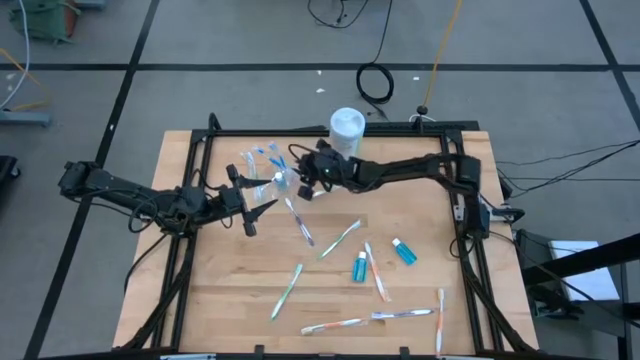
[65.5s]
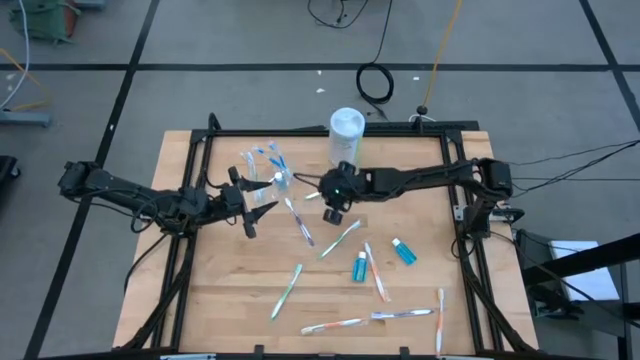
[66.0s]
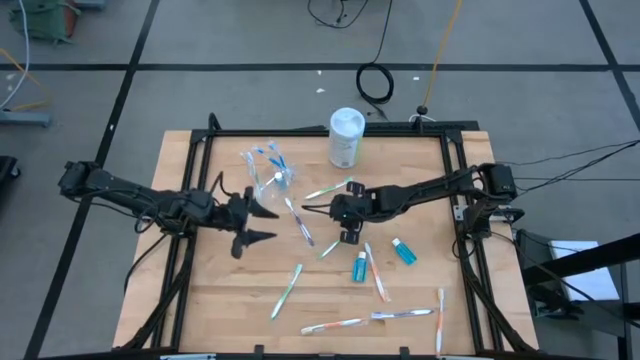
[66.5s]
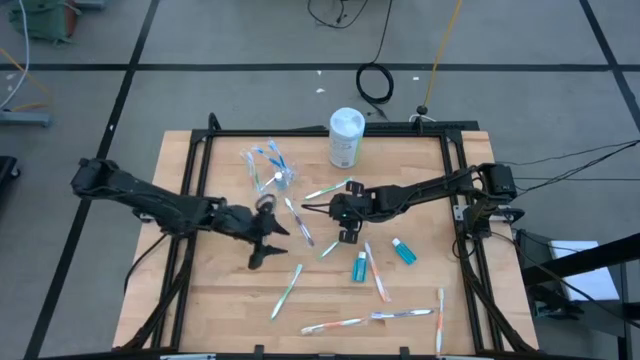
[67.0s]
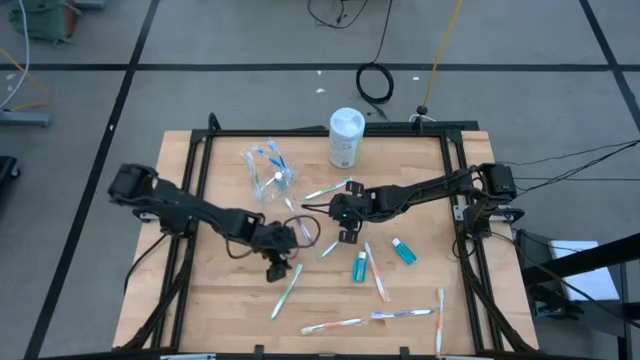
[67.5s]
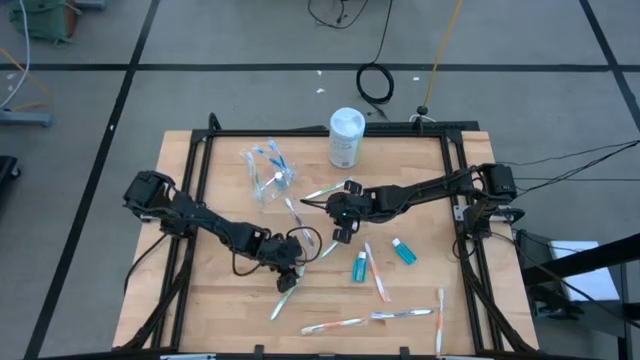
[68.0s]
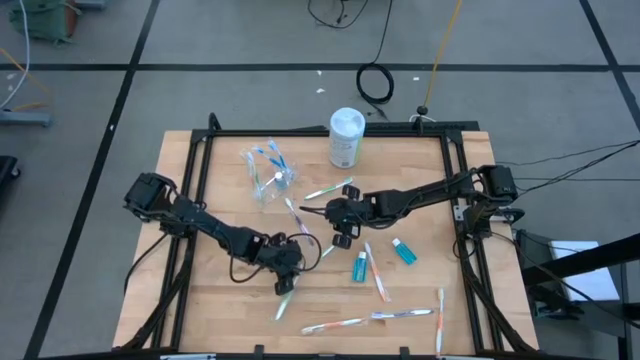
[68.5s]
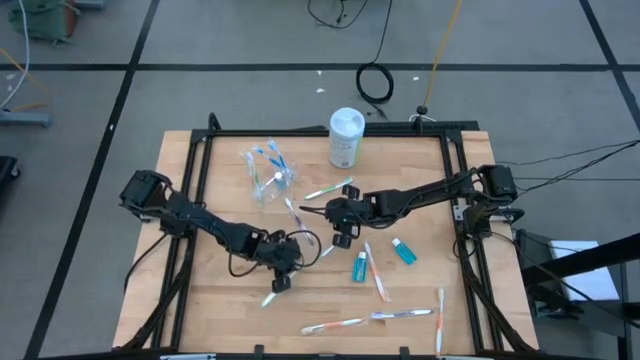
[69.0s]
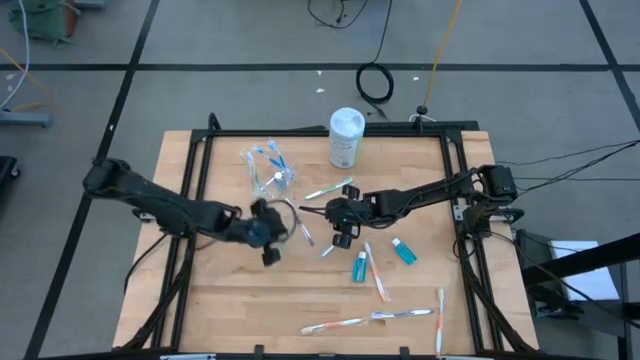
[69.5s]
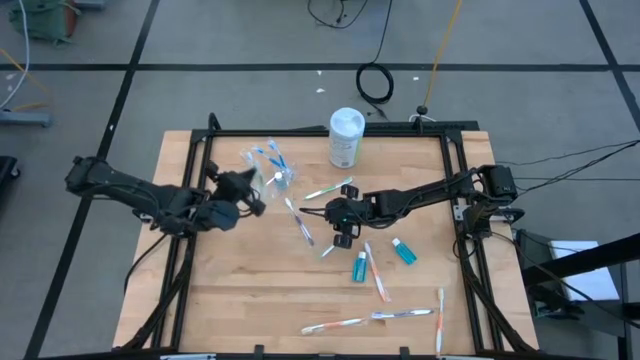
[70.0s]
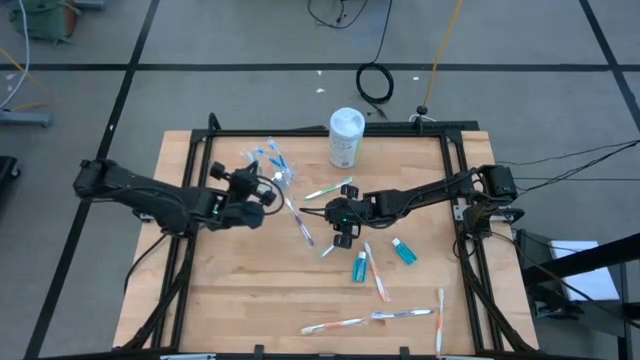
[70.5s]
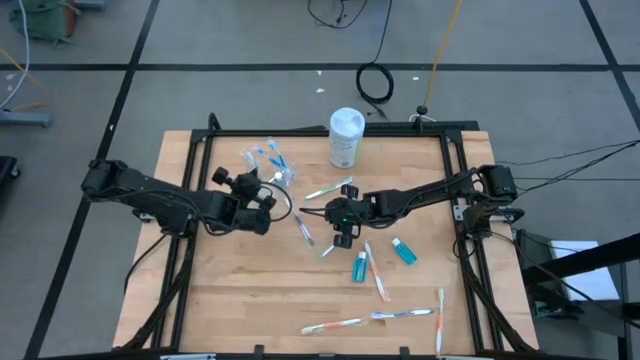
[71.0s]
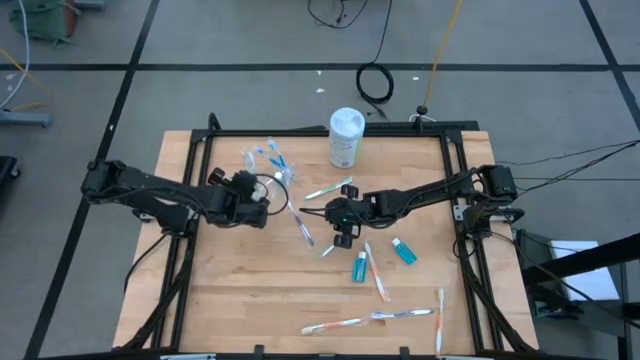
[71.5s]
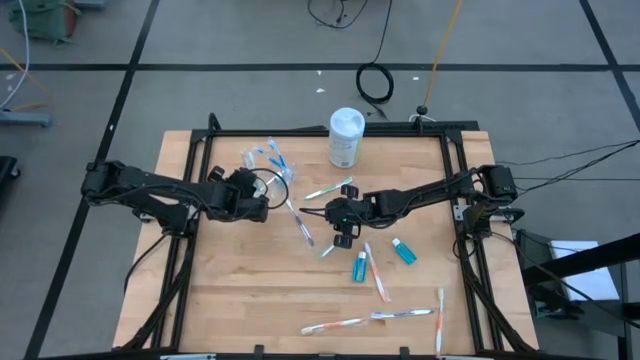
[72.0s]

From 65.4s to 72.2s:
Task: Pick & Place toothbrushing station
Put the green toothbrush into the left of the transparent organizer

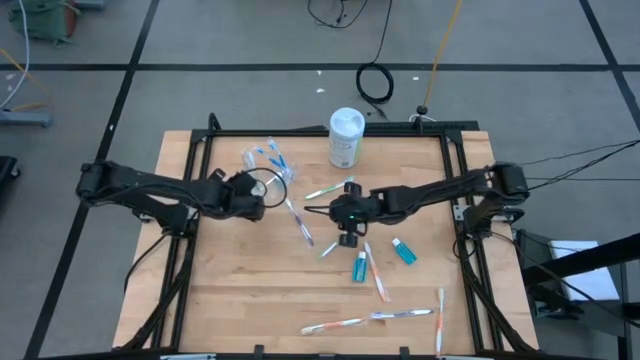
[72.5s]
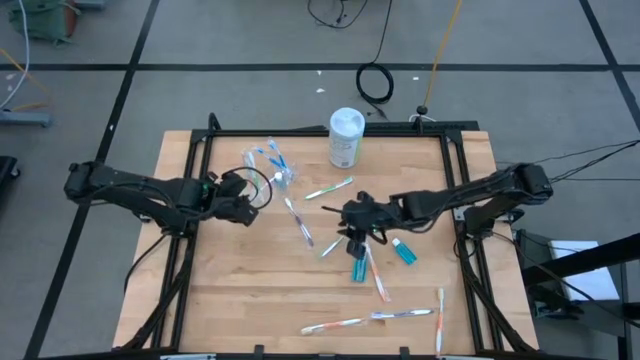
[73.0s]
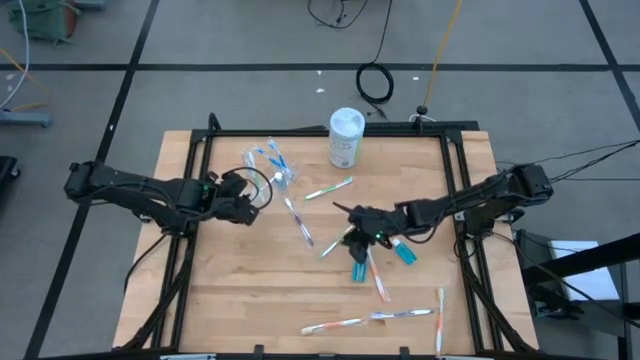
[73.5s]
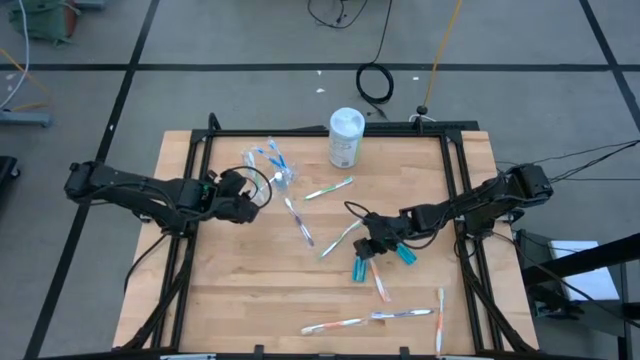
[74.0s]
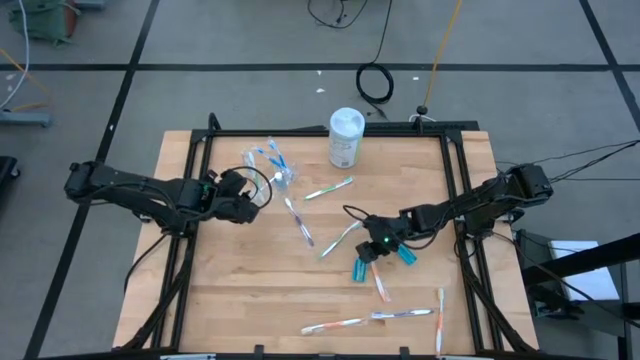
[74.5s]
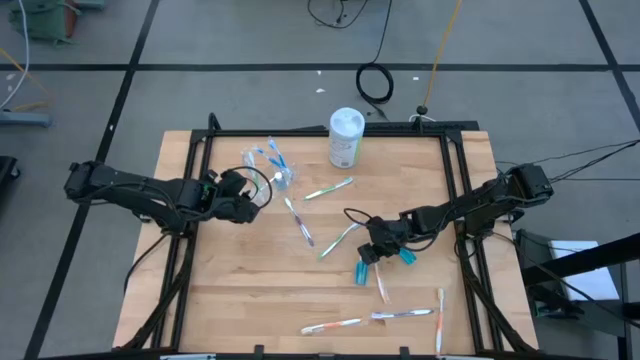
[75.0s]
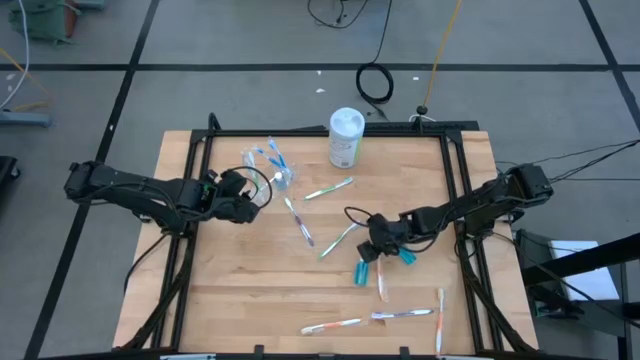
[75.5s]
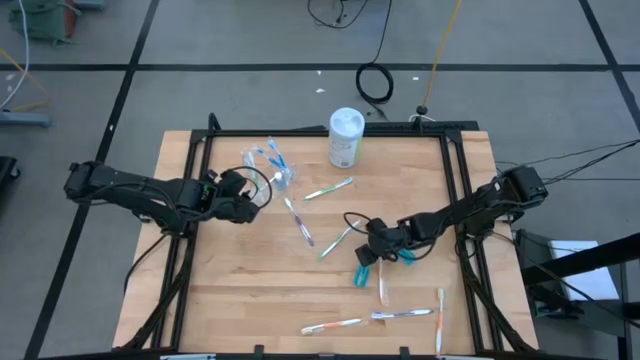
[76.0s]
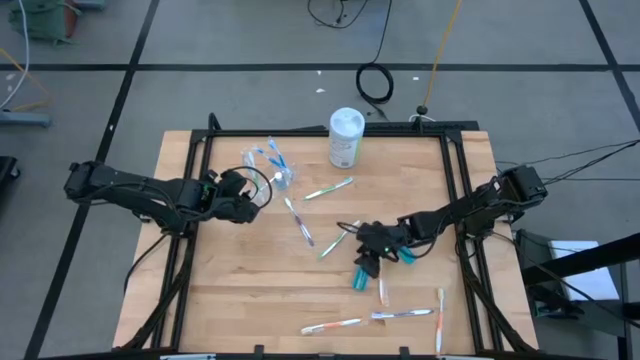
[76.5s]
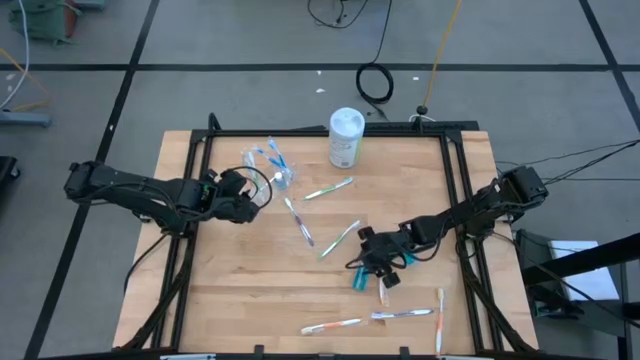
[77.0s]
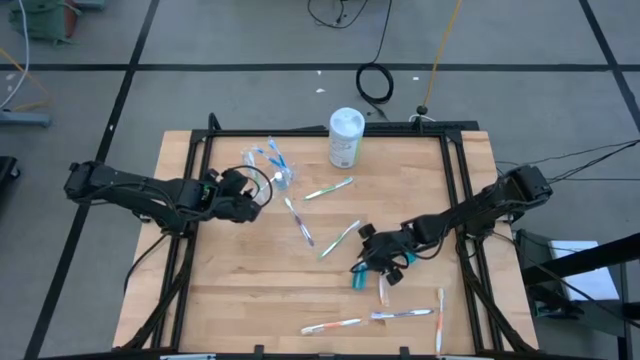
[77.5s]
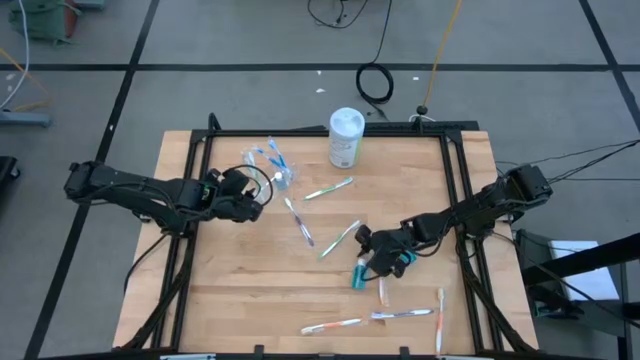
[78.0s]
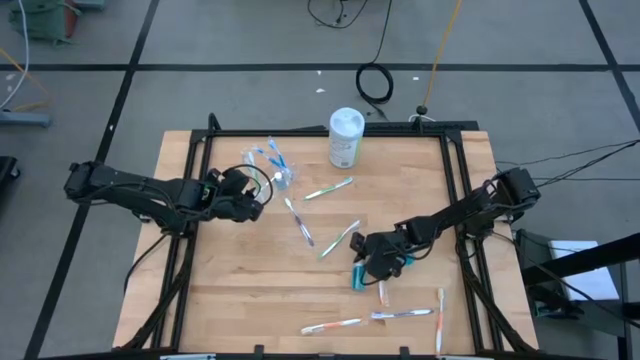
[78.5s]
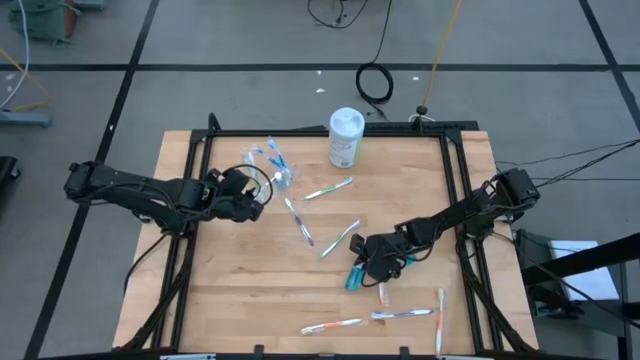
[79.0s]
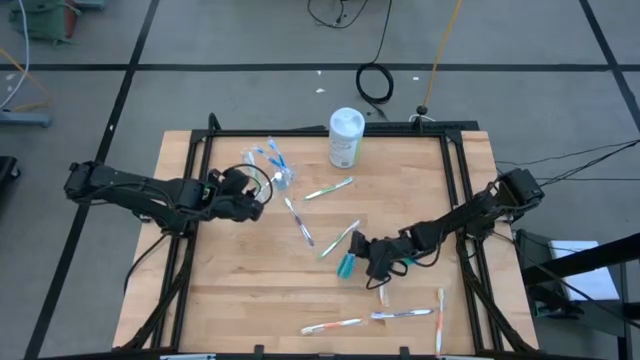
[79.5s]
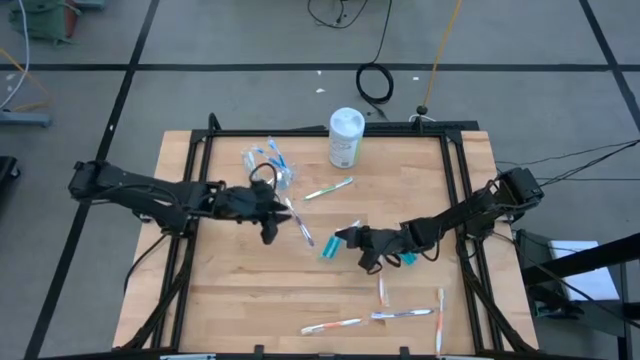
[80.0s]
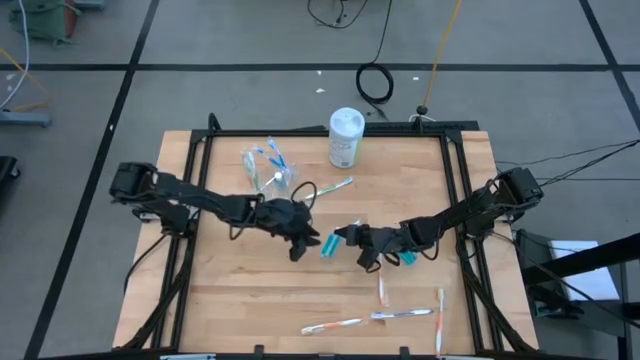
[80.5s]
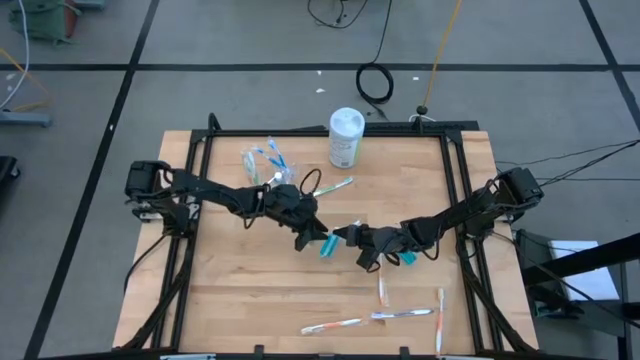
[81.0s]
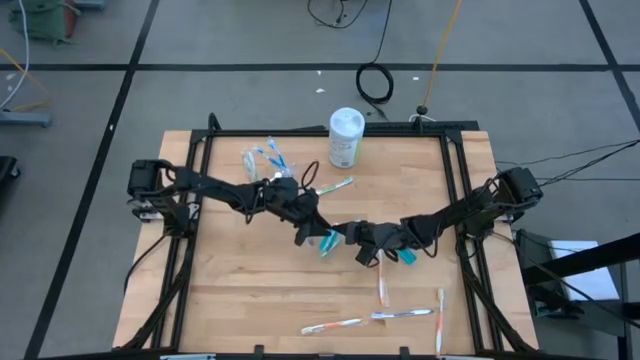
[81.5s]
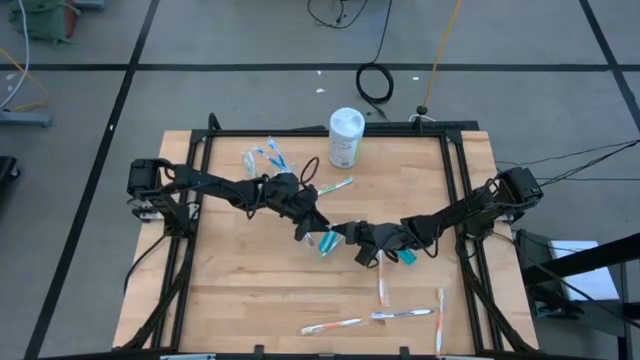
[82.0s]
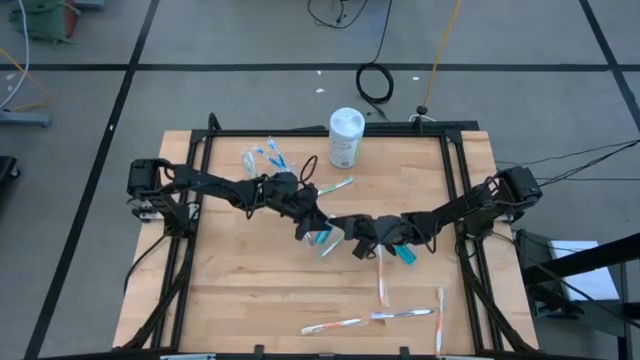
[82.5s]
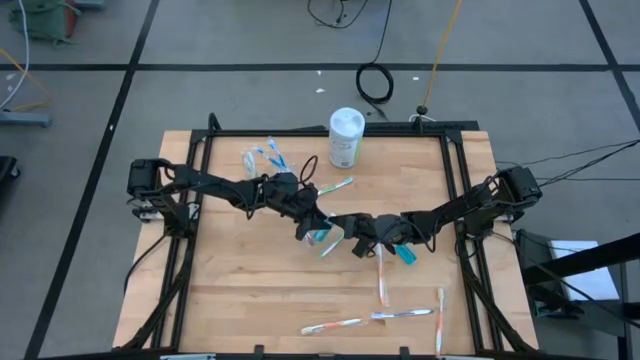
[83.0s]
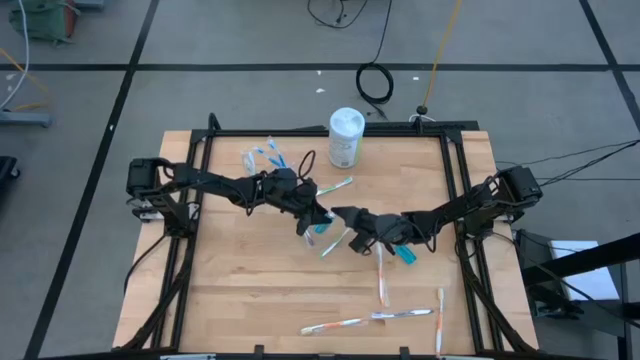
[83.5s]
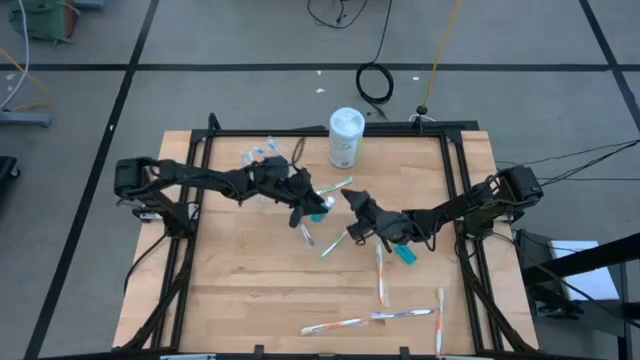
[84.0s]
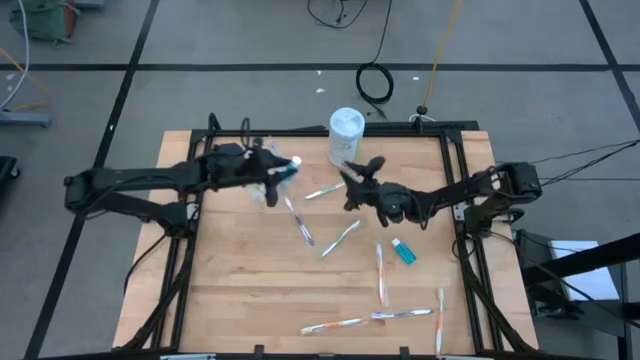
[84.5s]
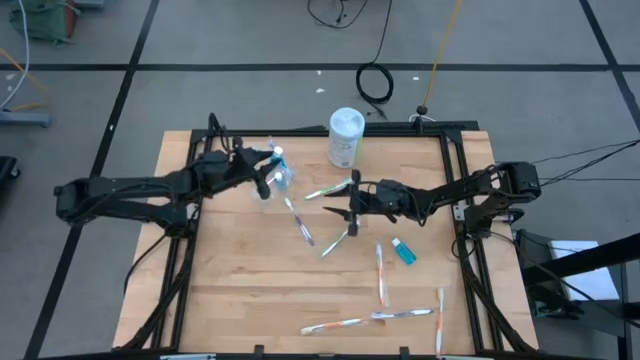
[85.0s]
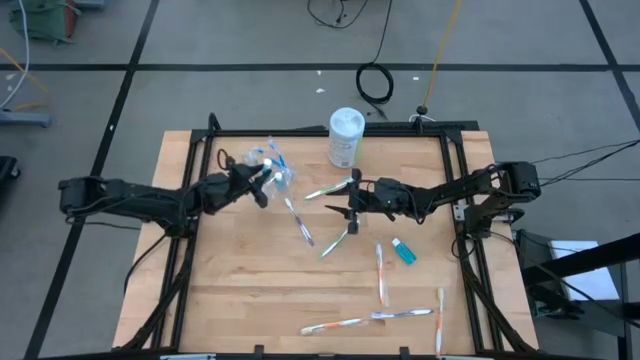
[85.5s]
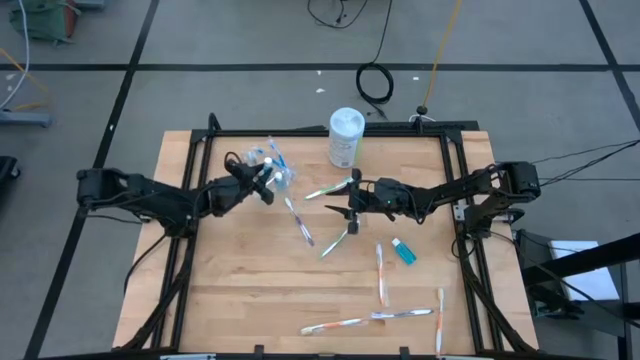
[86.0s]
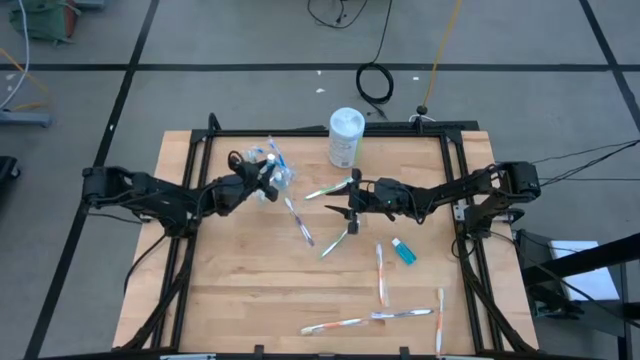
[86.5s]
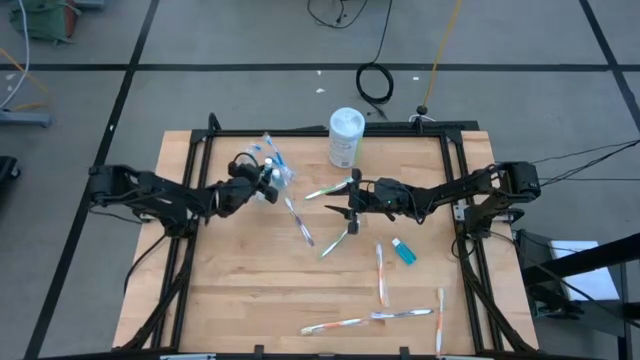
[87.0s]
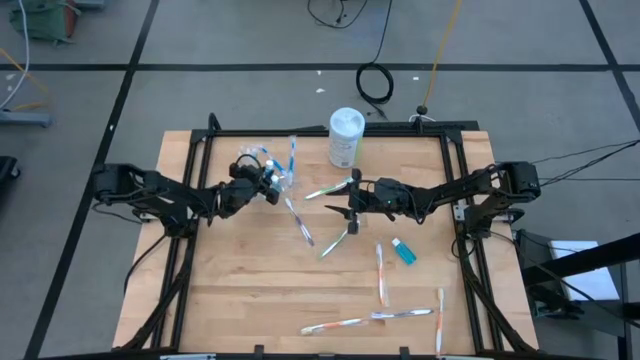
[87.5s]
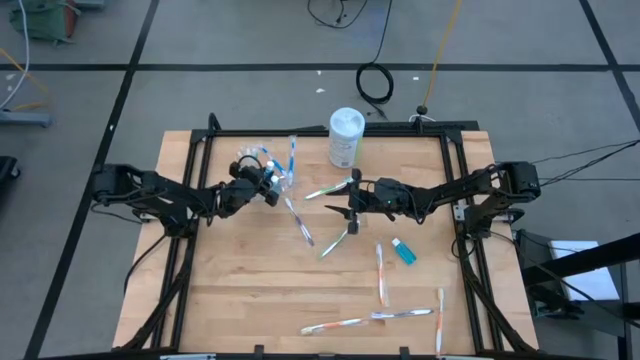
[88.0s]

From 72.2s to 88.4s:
Put the mouthwash into the middle of the transparent organizer
